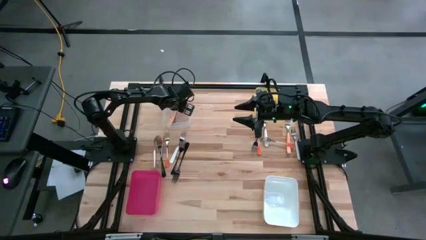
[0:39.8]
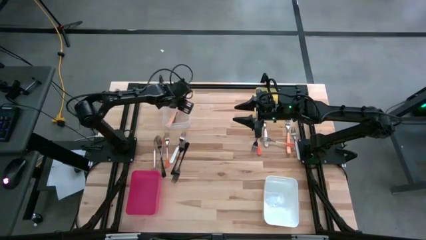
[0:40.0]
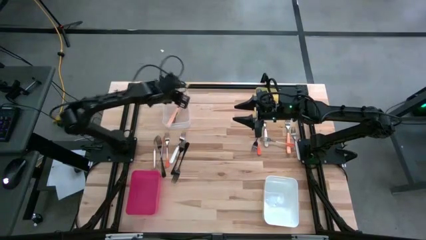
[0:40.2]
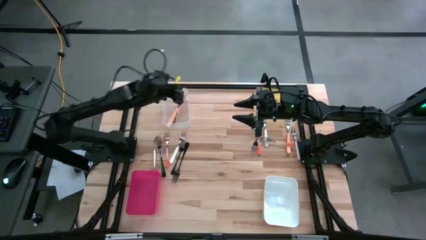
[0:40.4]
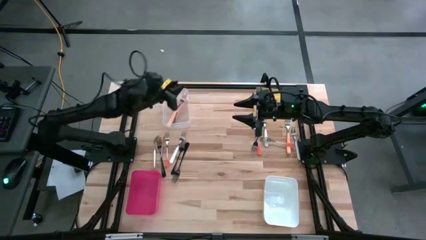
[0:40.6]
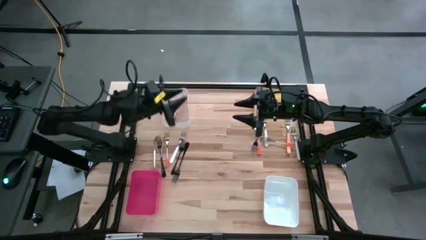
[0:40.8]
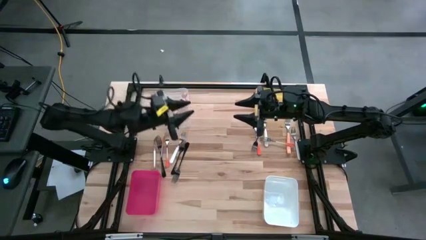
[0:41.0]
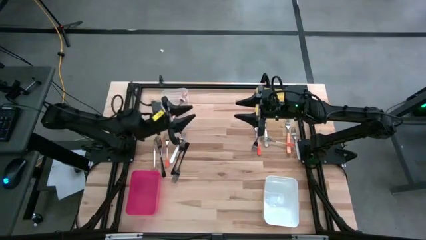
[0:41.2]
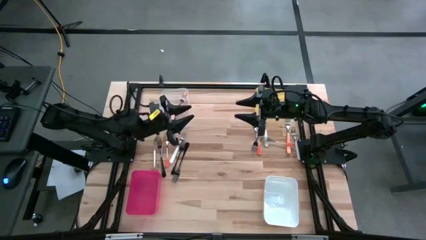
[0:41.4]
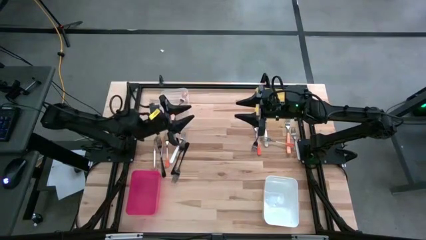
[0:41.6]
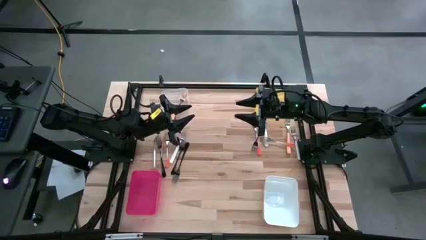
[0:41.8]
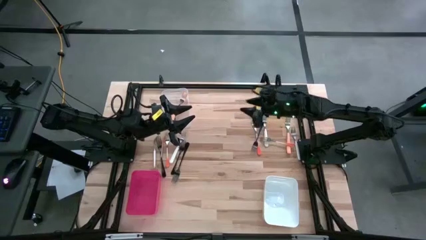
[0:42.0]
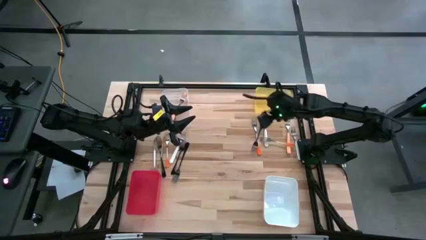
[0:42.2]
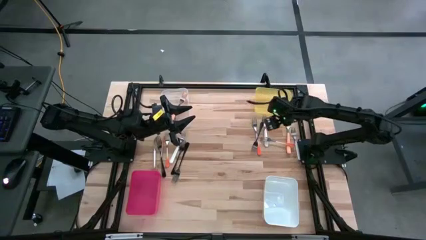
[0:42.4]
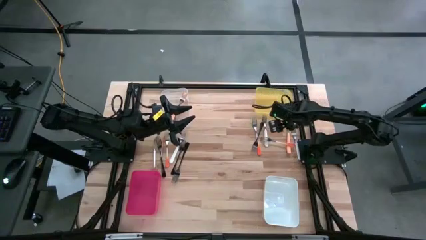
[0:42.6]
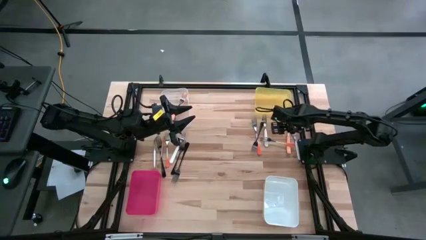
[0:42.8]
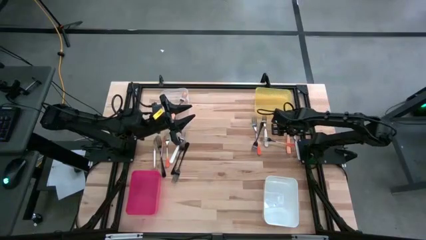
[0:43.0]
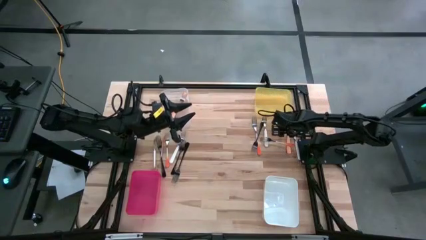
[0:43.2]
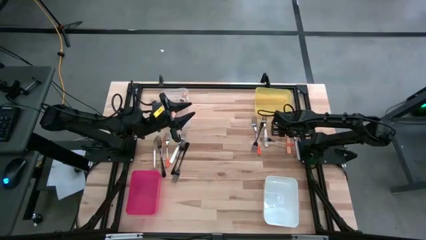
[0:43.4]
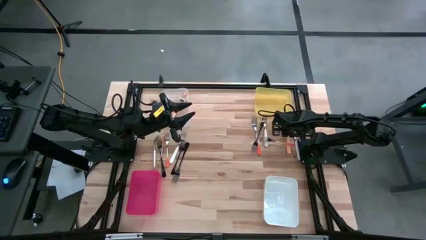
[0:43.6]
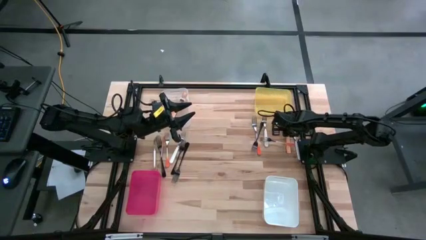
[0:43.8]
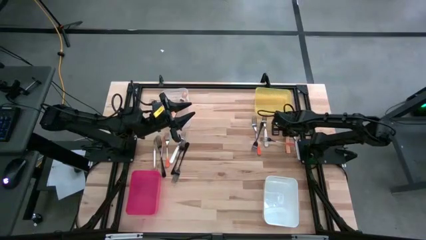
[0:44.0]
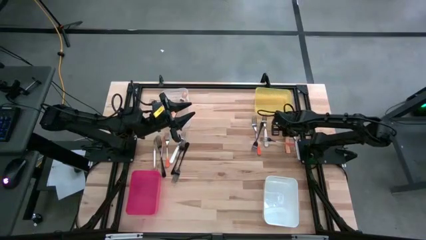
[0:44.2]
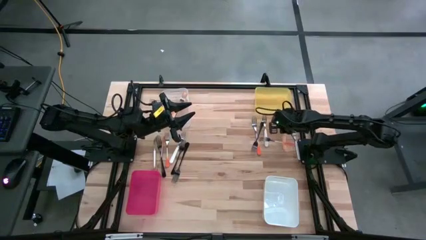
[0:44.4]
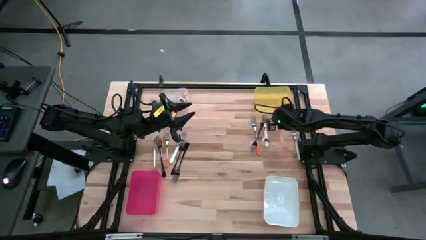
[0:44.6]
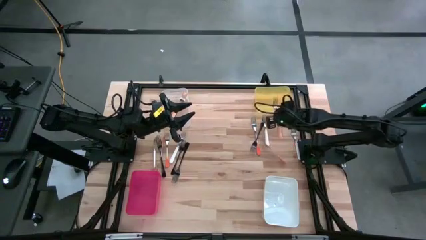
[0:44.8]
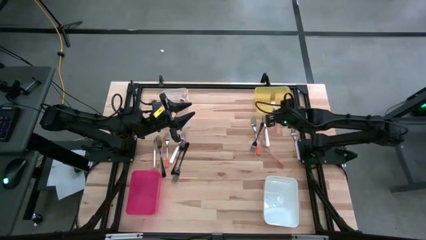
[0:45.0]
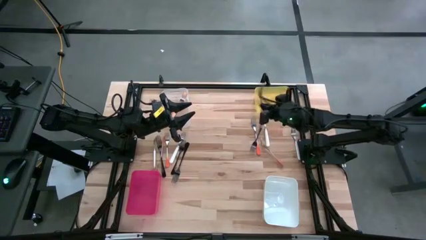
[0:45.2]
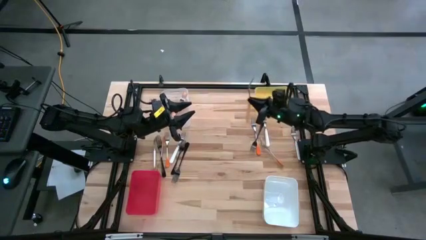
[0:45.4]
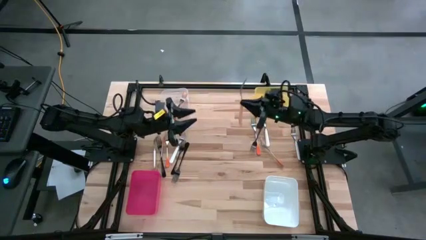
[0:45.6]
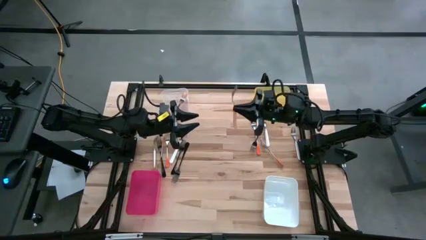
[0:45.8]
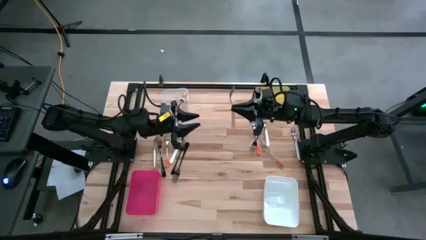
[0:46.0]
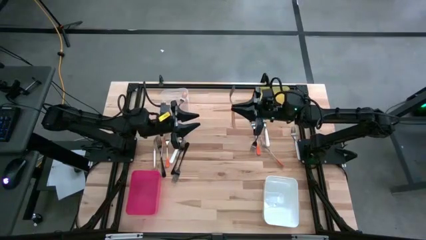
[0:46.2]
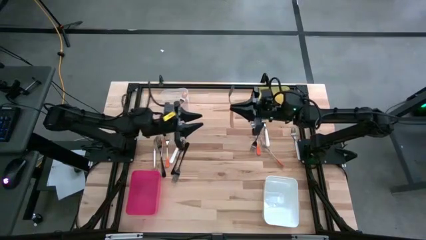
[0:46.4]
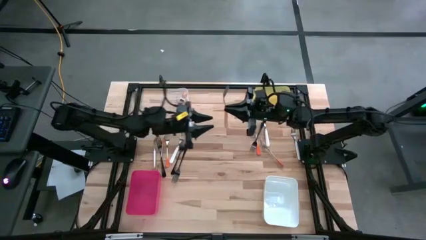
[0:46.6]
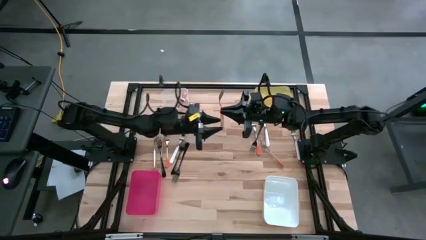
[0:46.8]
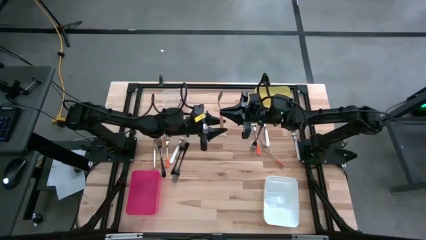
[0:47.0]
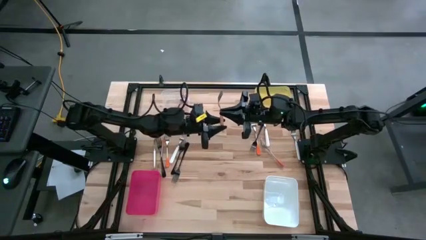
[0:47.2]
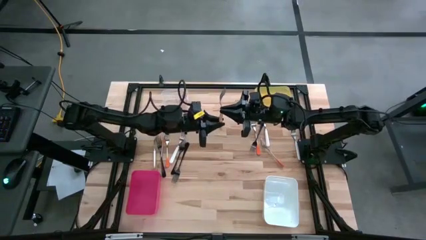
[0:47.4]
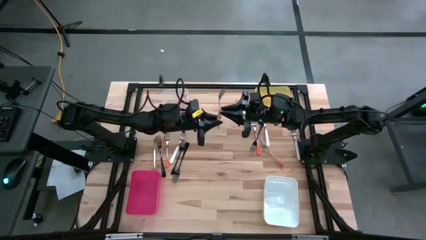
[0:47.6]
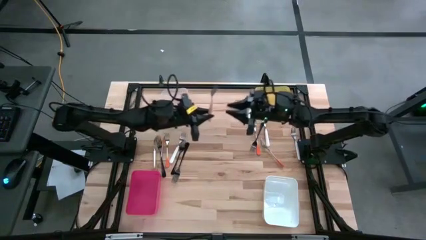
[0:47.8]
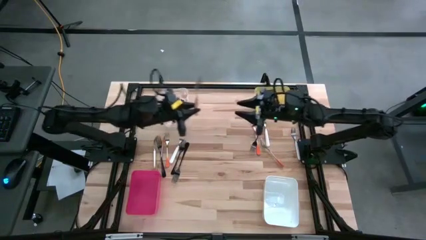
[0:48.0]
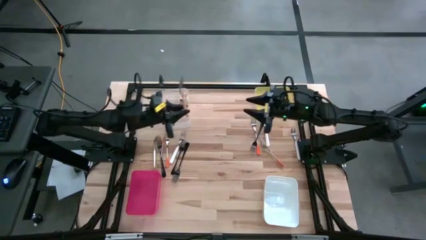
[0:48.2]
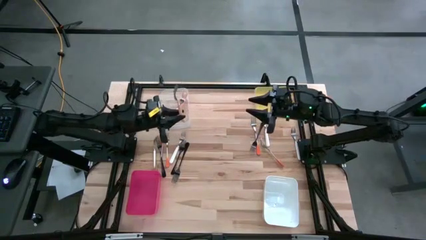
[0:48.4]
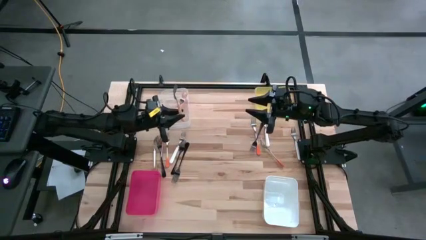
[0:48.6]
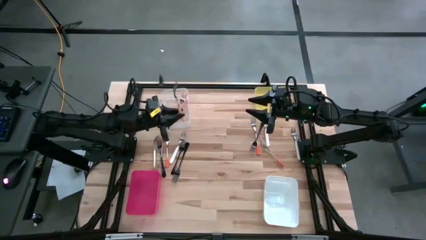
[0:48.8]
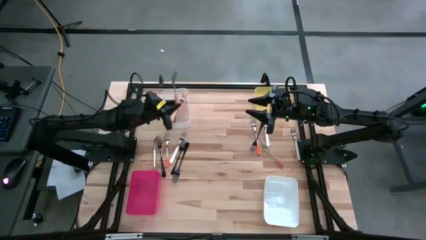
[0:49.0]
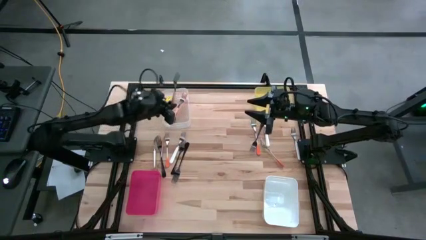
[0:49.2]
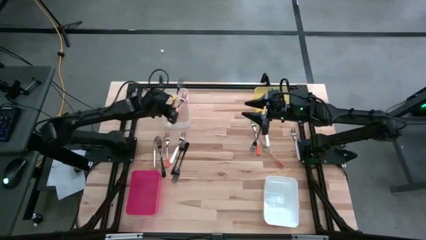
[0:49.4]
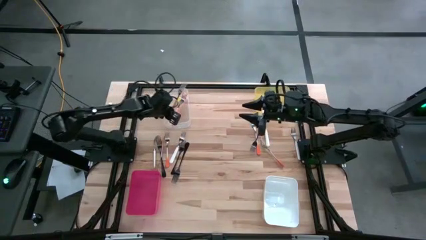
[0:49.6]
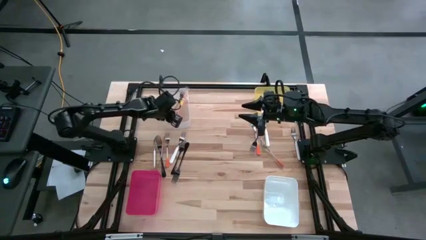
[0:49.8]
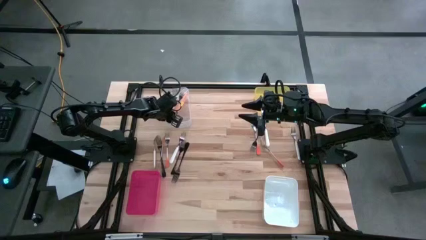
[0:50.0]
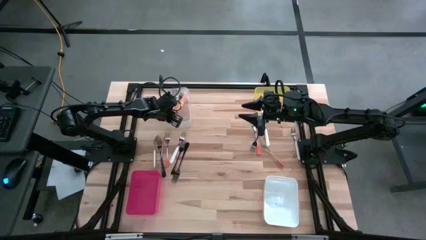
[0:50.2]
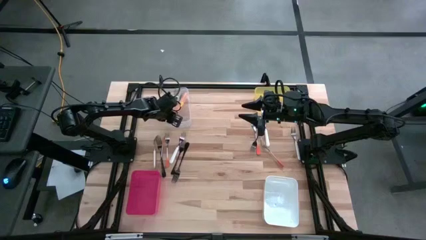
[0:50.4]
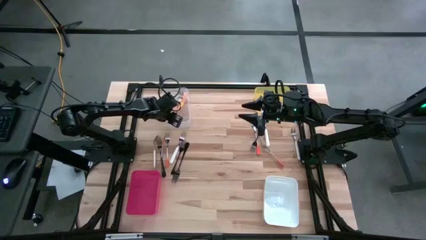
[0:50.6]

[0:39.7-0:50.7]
Task: Sort silverware by color (type)
Put the orange fork into the transparent bin
